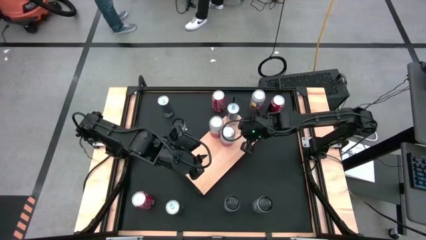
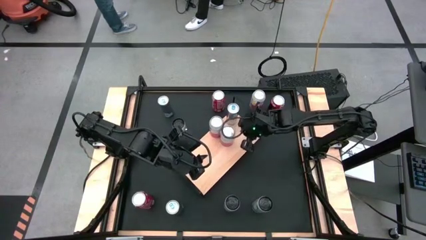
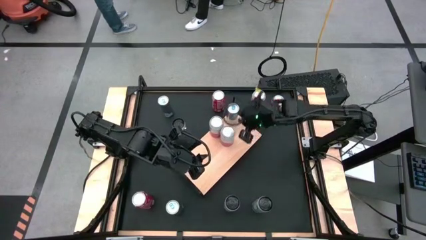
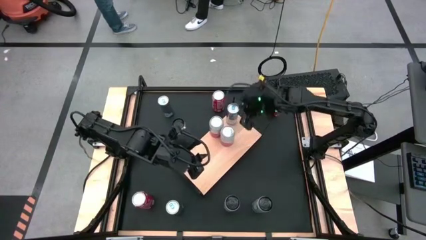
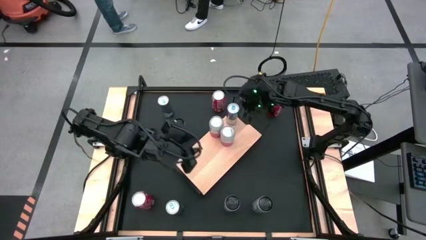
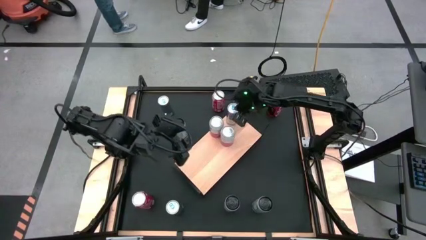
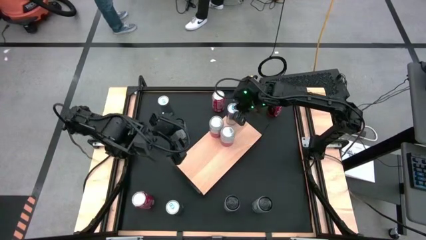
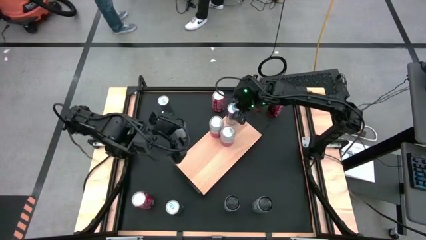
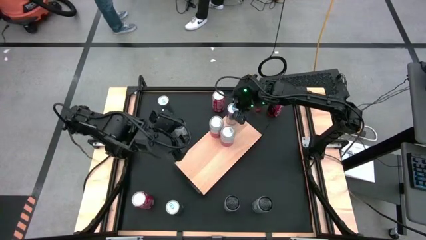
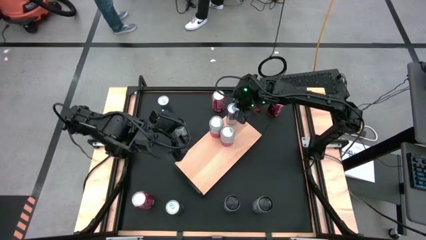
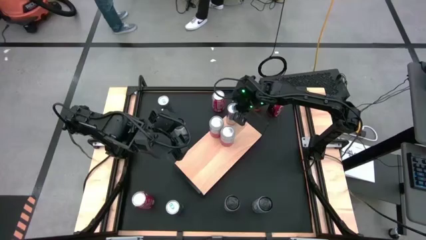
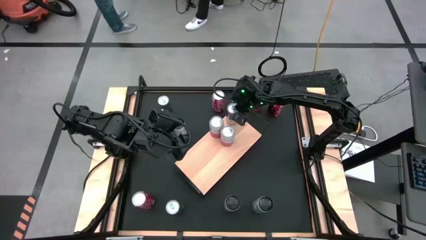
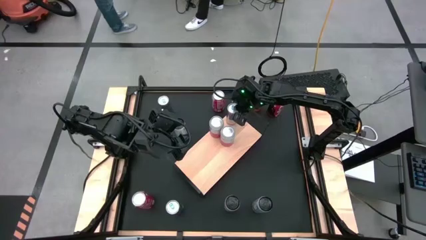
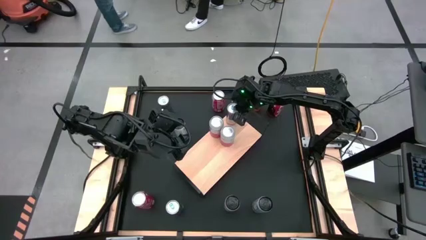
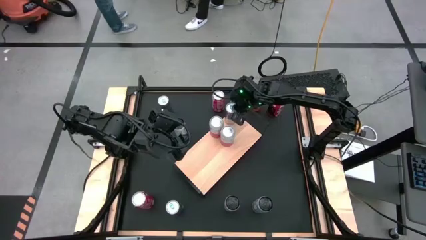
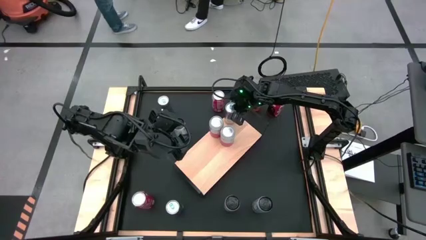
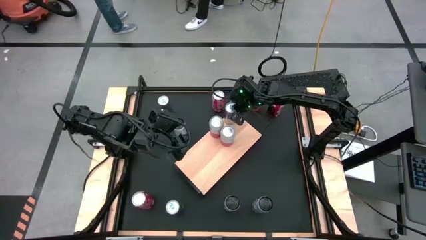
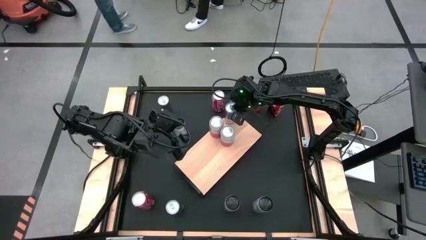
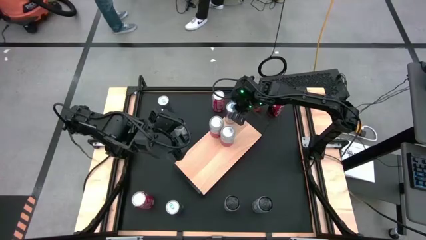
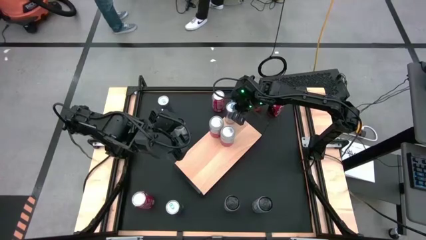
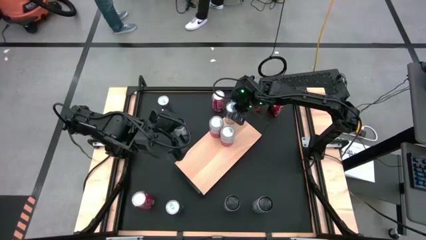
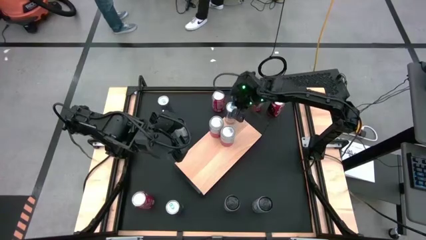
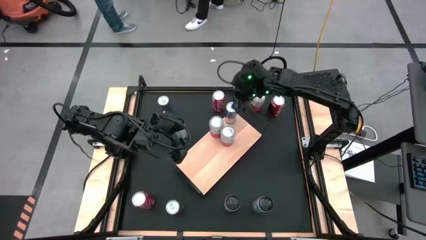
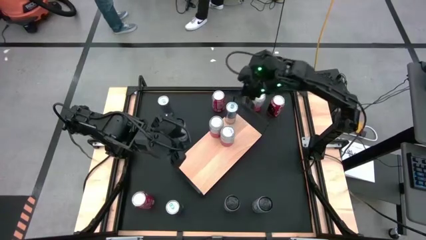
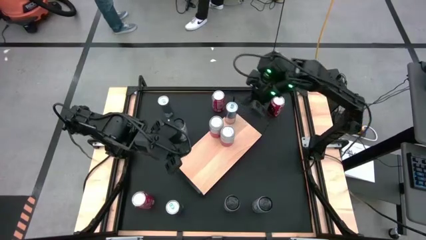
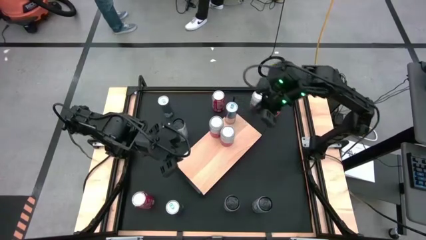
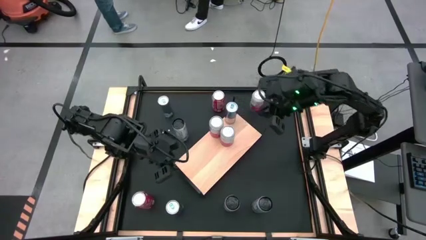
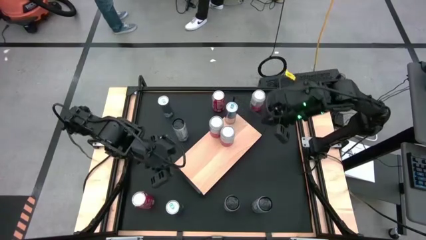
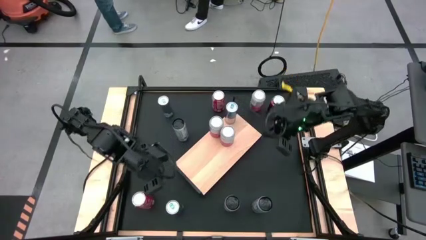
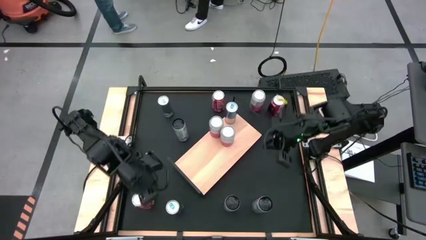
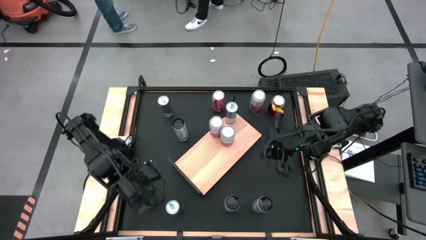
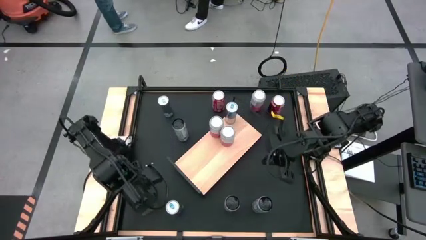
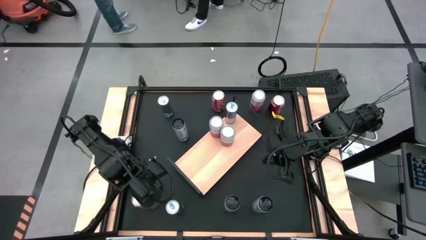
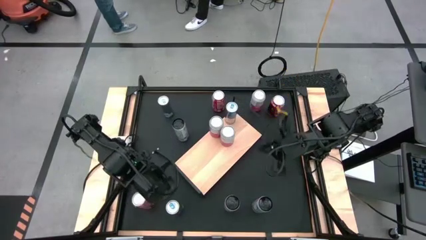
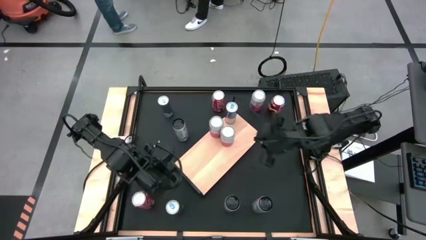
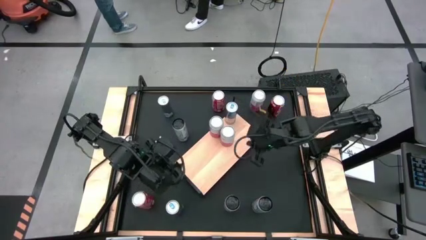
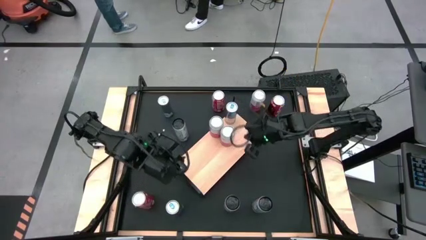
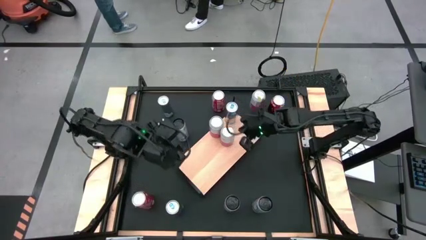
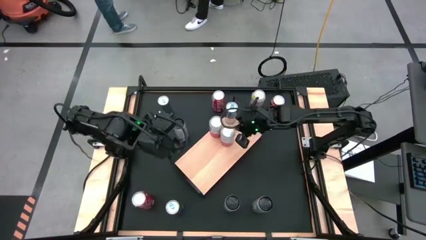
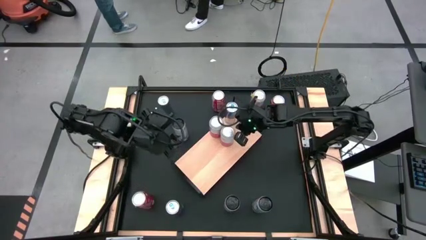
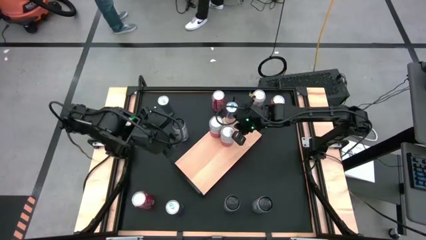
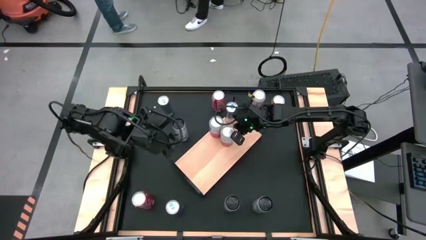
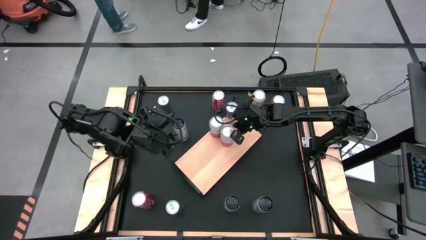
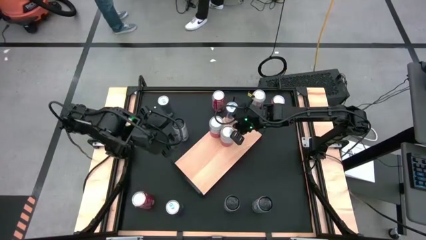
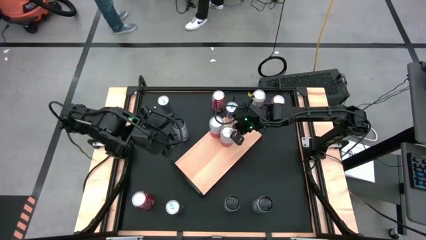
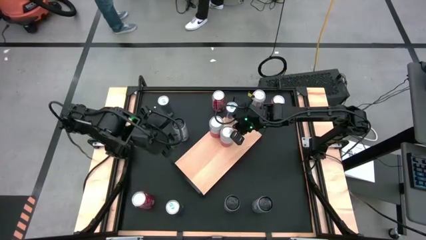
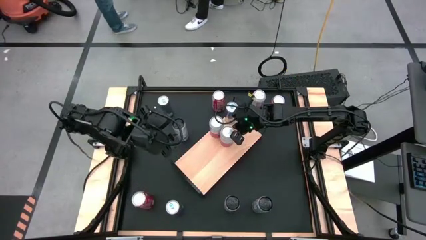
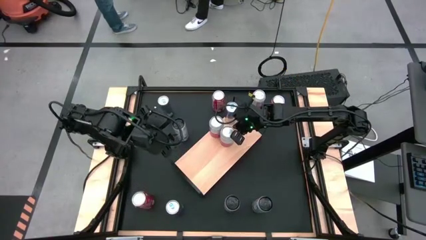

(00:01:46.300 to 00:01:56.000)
Task: Place canned beverage on shelf
Adjust the soda cans on the shelf
